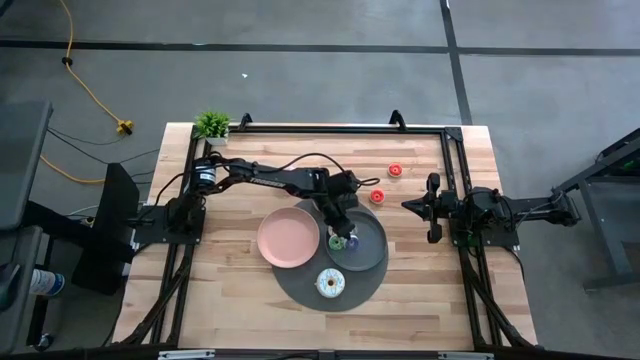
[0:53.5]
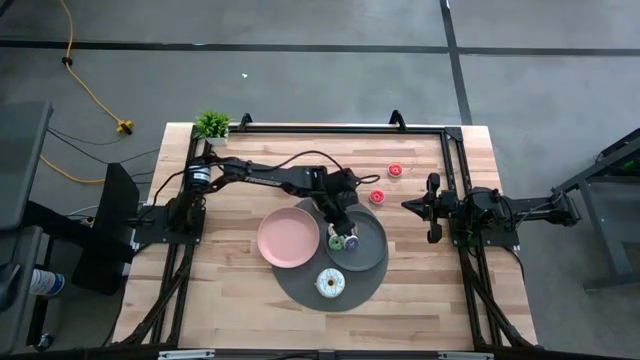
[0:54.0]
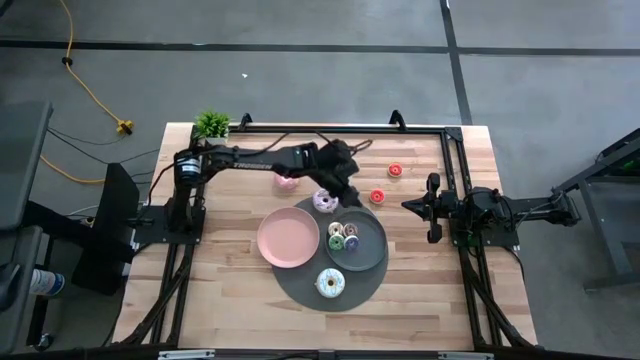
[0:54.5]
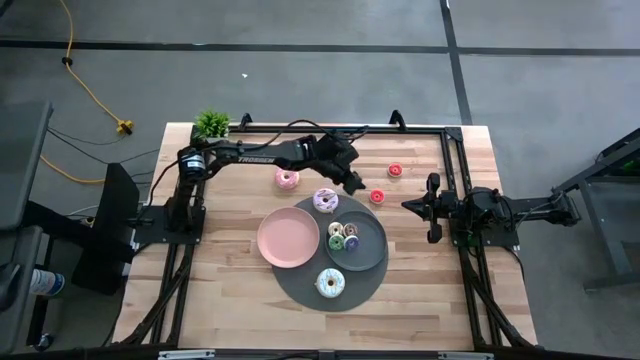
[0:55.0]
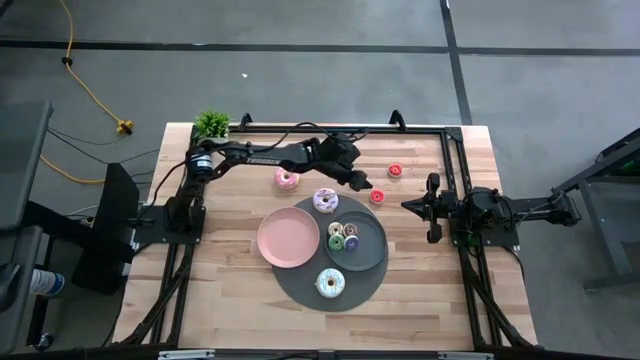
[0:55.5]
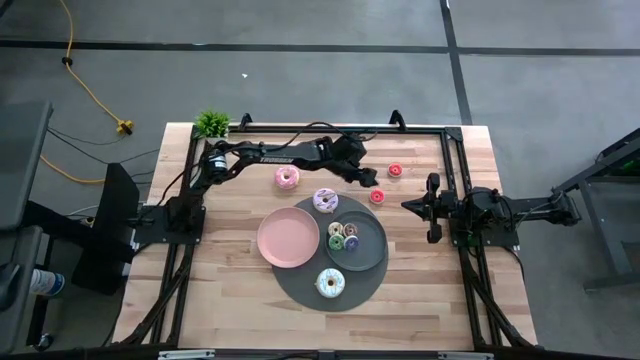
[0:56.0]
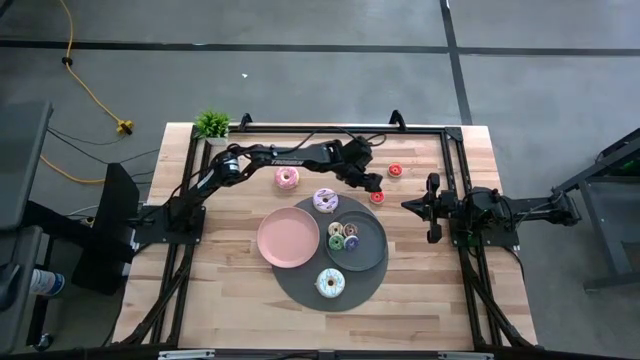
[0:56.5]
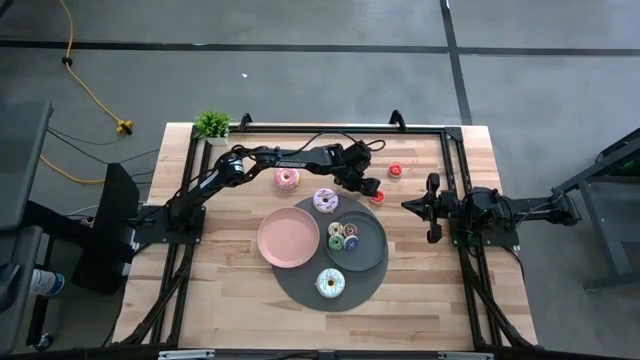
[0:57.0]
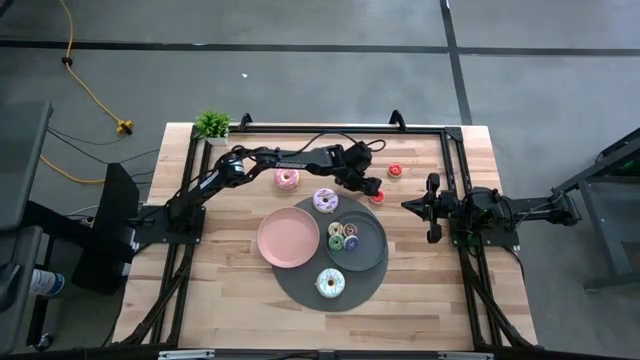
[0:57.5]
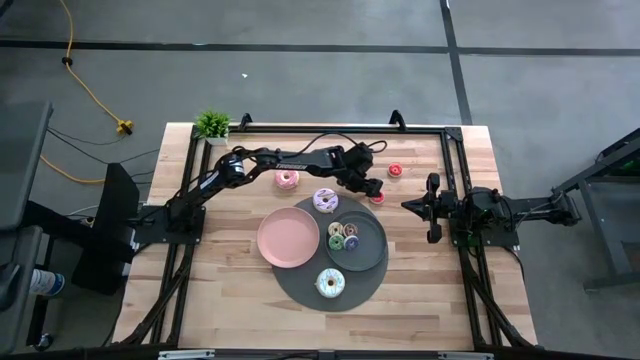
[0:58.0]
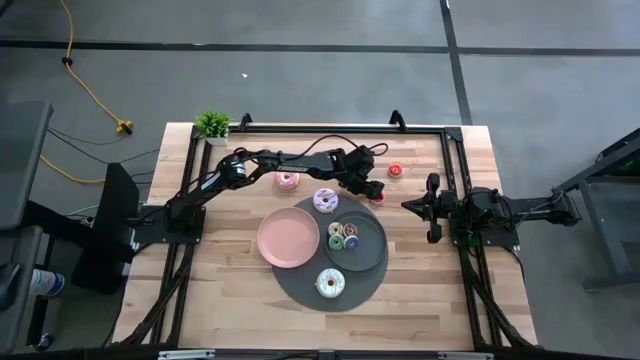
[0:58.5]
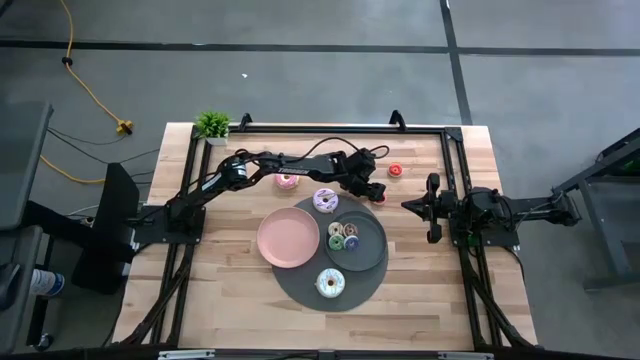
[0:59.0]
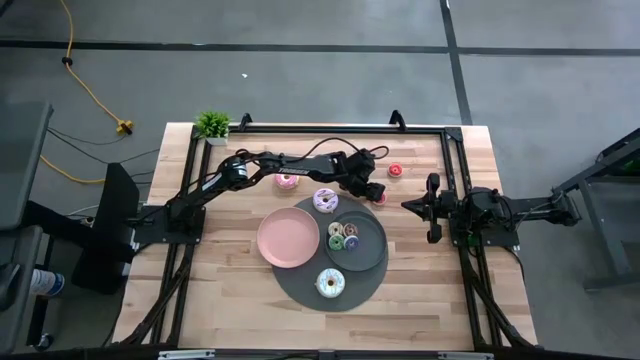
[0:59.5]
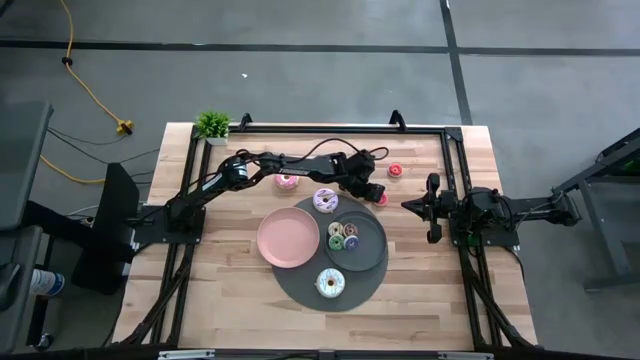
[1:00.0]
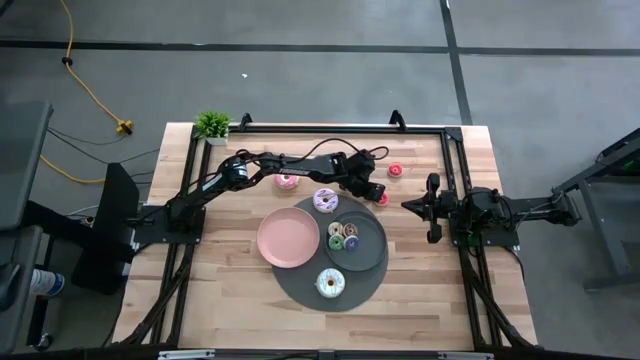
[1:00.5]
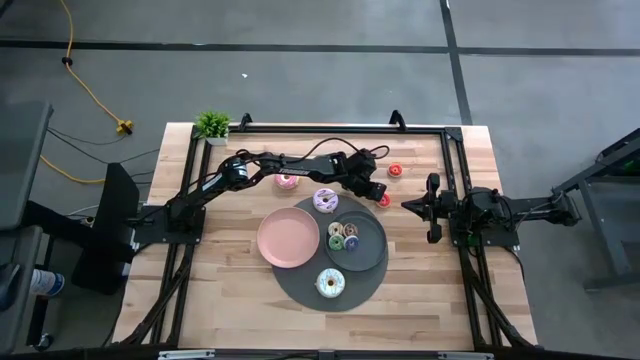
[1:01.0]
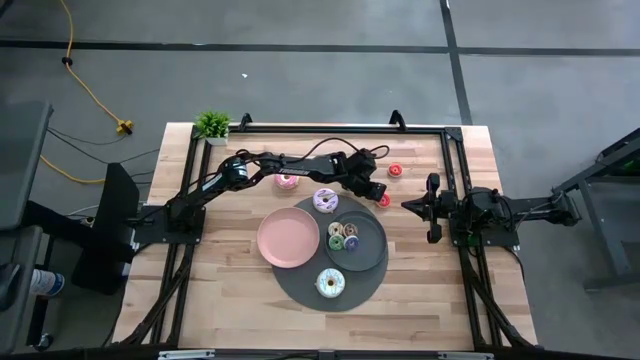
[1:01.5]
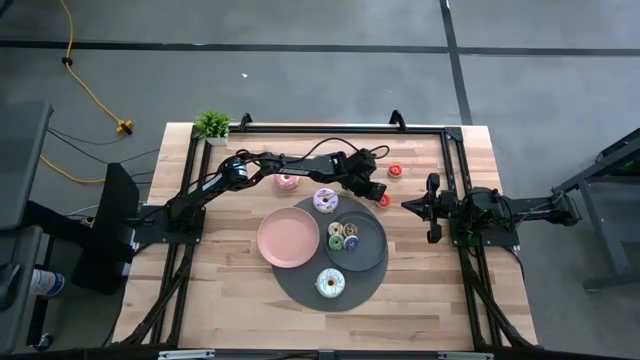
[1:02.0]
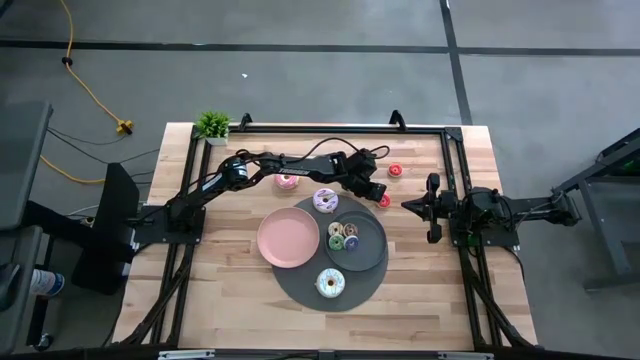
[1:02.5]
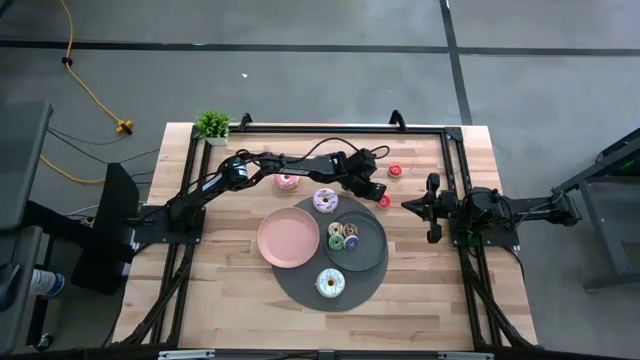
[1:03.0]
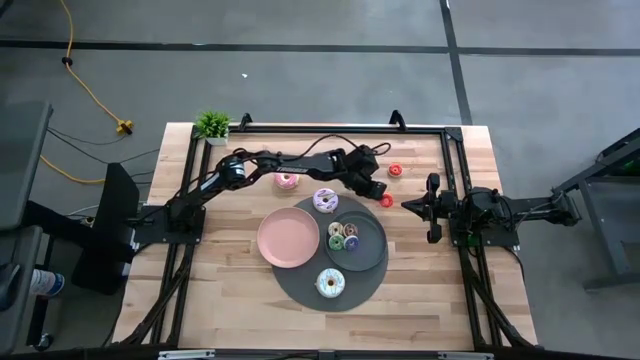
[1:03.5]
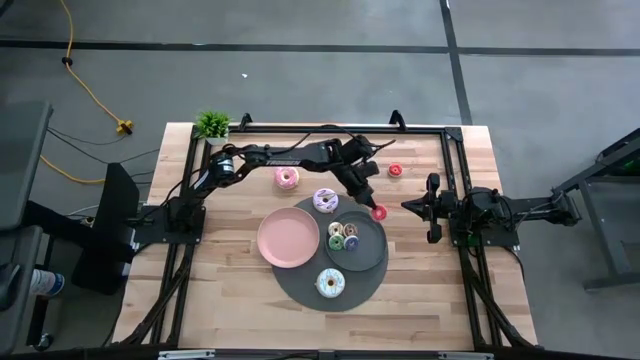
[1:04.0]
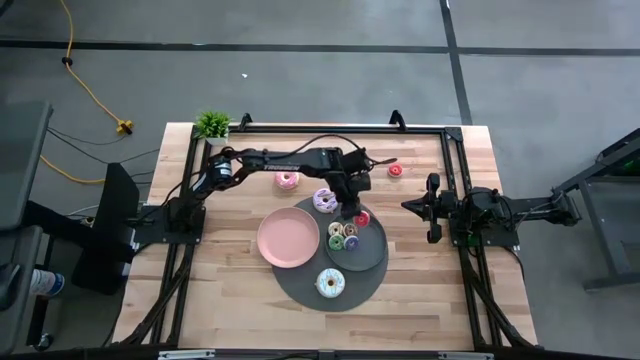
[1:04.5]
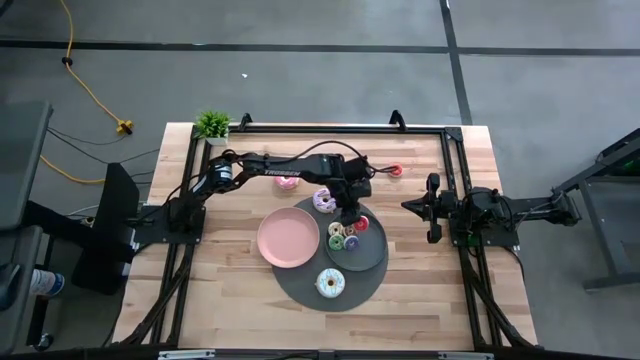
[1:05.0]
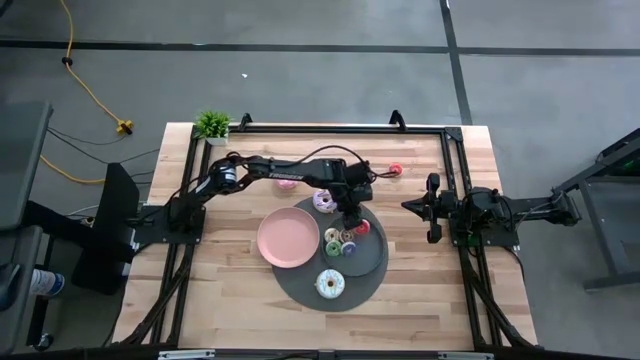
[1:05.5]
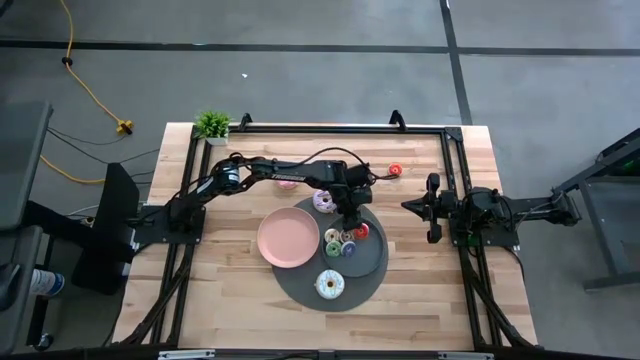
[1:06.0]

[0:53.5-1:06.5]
Task: Pick & Place donuts
Put the bottom small red donut on the black plate

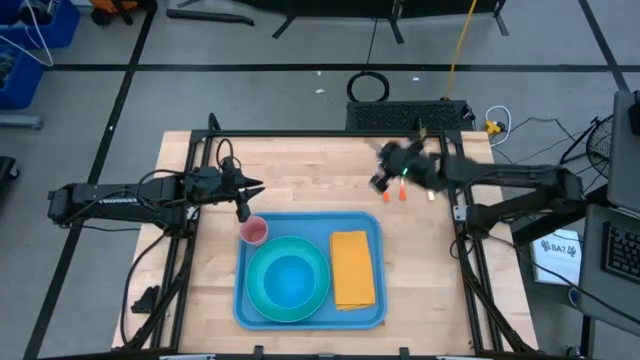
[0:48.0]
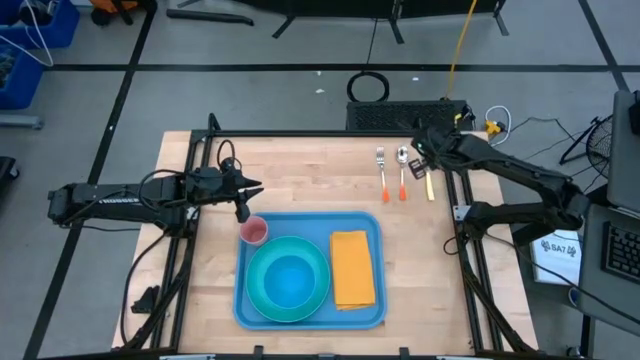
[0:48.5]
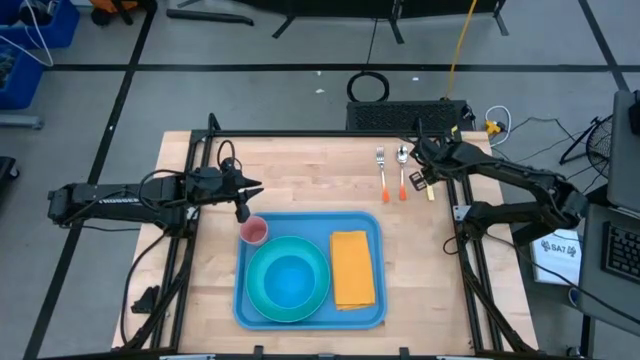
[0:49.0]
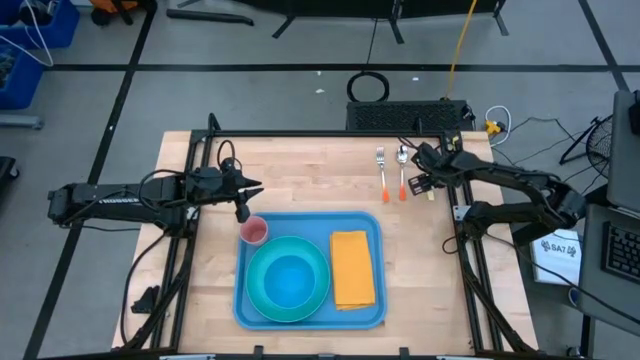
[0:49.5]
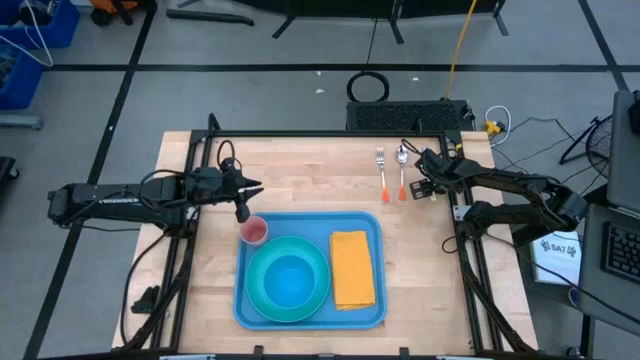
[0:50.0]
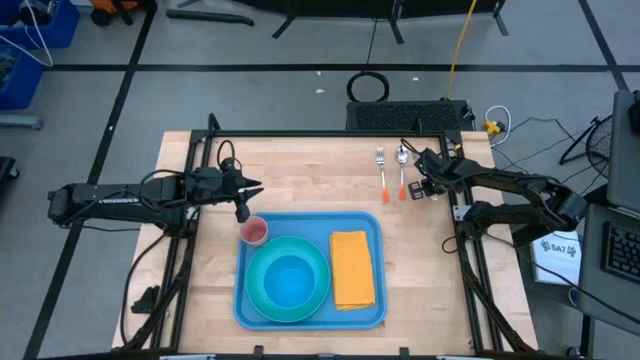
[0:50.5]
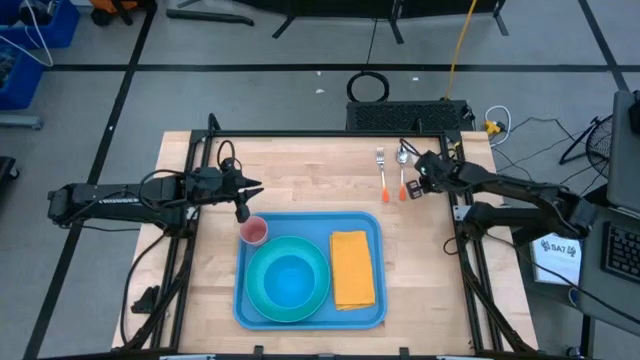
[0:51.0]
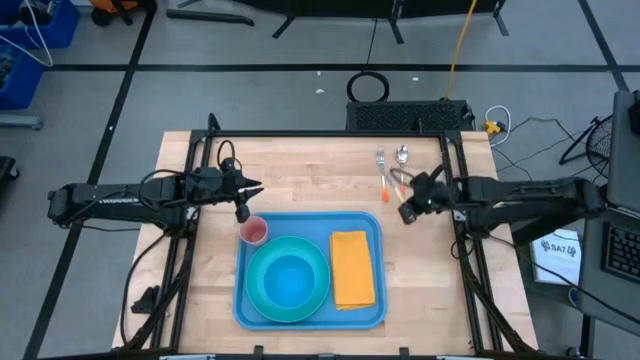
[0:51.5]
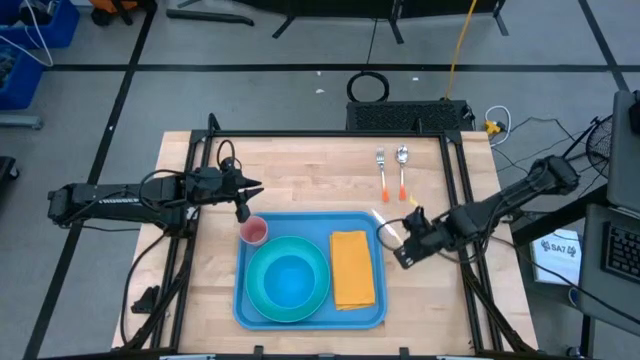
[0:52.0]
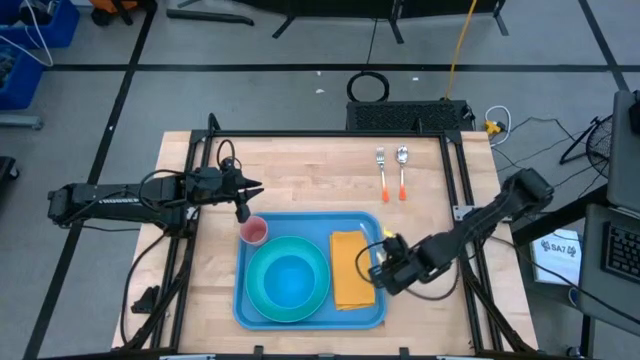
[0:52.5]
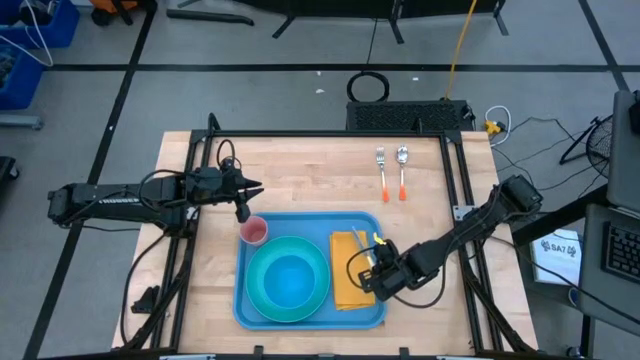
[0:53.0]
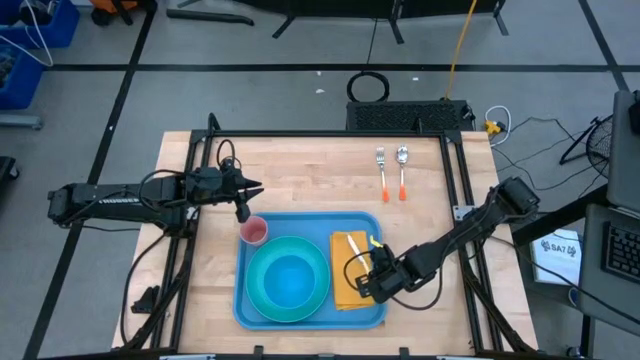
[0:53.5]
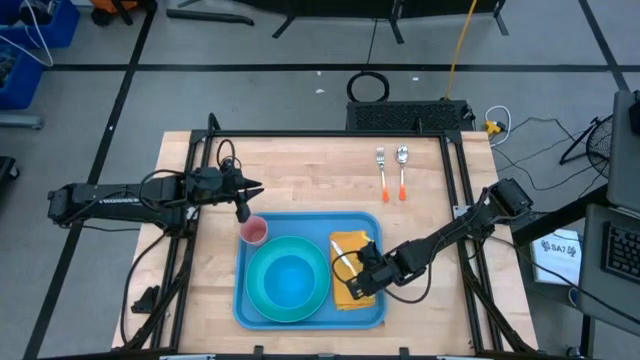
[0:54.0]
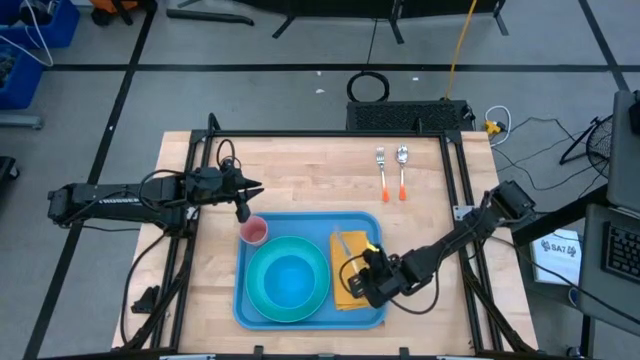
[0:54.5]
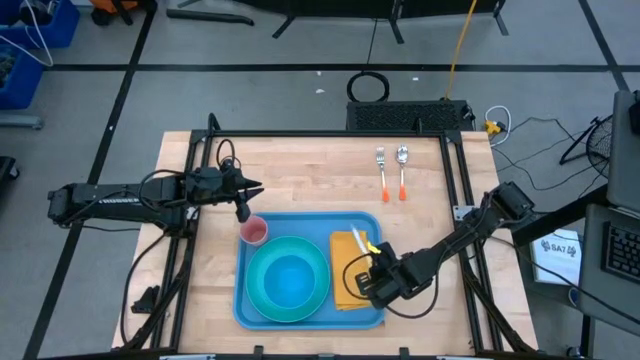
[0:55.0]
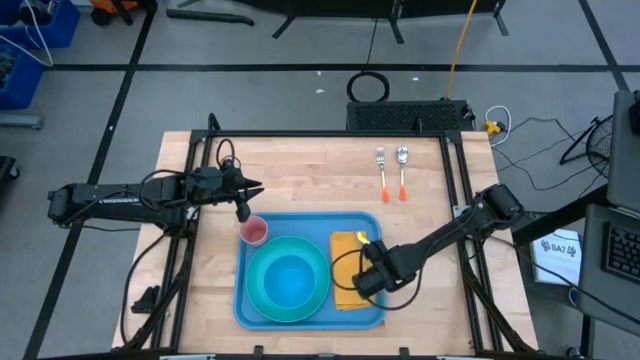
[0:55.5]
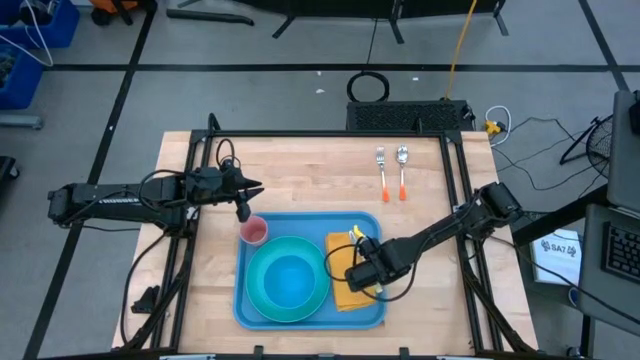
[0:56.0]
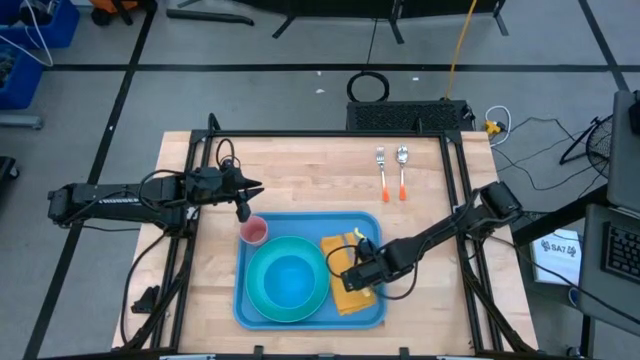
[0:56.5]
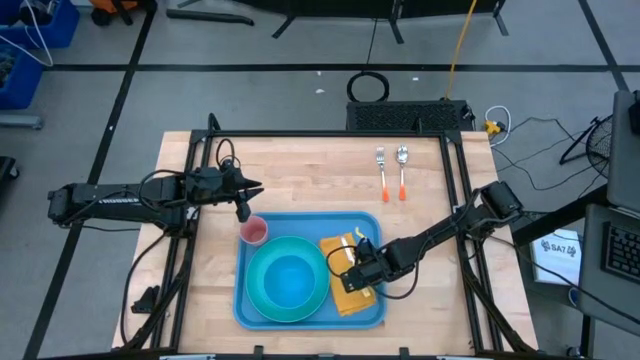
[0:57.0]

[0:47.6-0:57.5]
Task: Set up tray
Put the yellow knife to the yellow napkin on the blue serving tray
